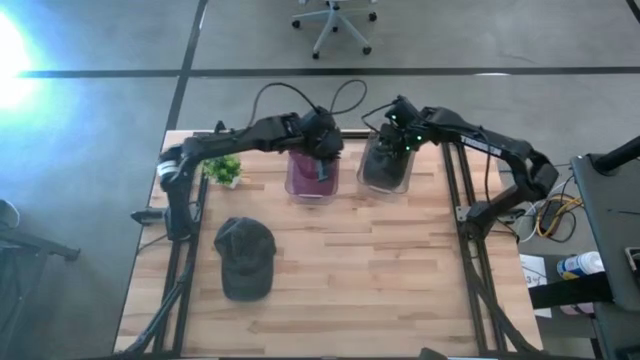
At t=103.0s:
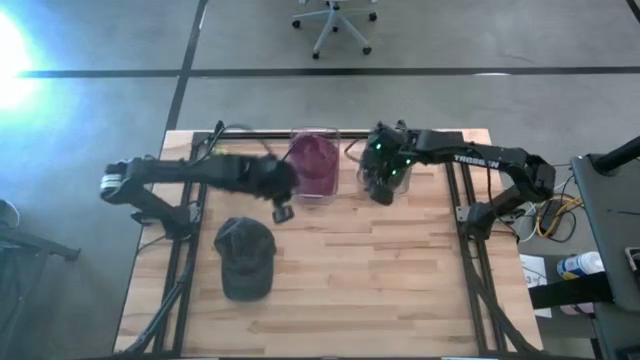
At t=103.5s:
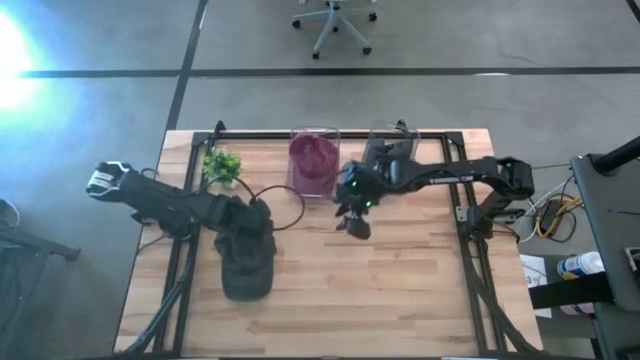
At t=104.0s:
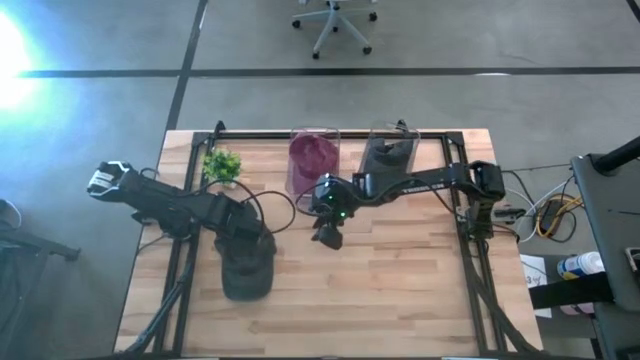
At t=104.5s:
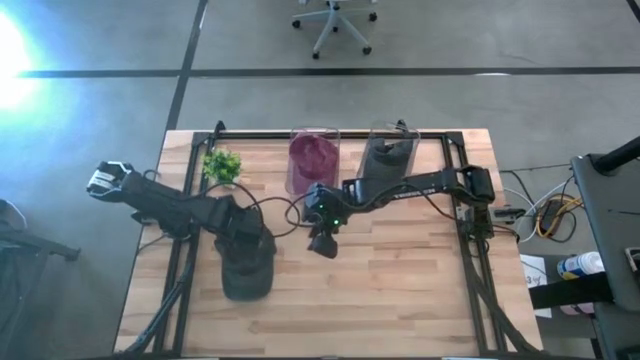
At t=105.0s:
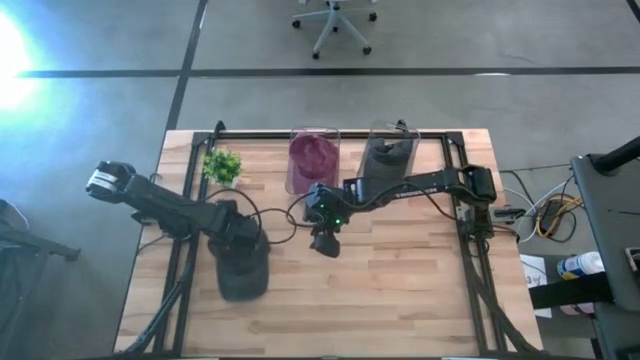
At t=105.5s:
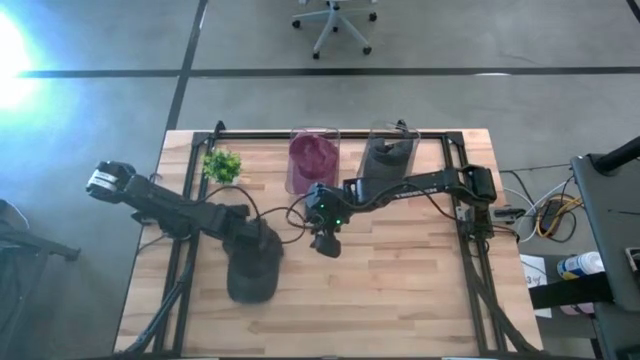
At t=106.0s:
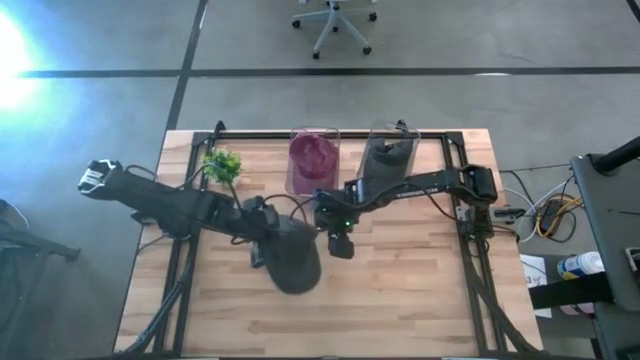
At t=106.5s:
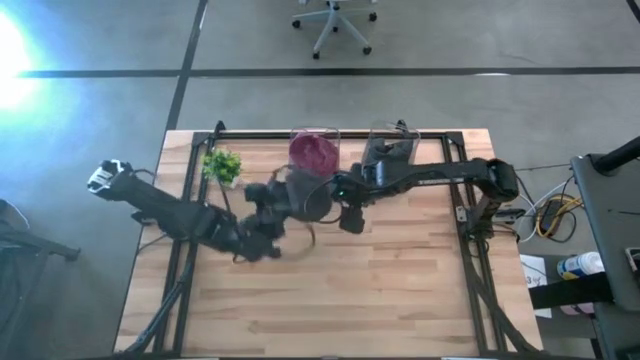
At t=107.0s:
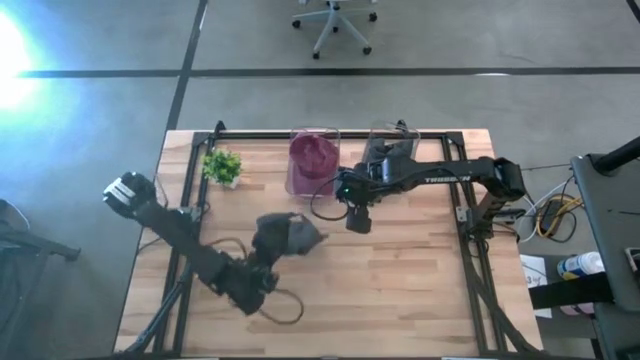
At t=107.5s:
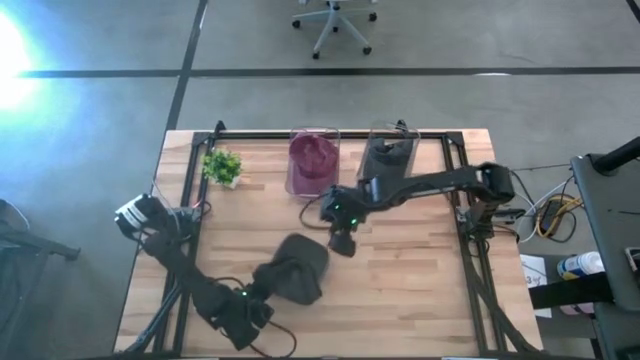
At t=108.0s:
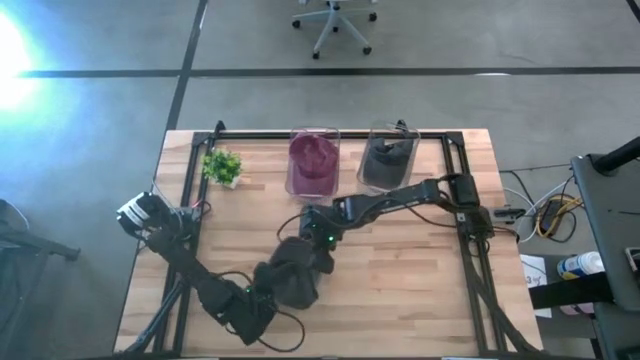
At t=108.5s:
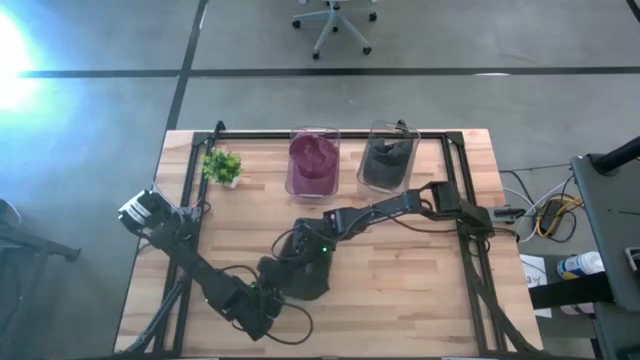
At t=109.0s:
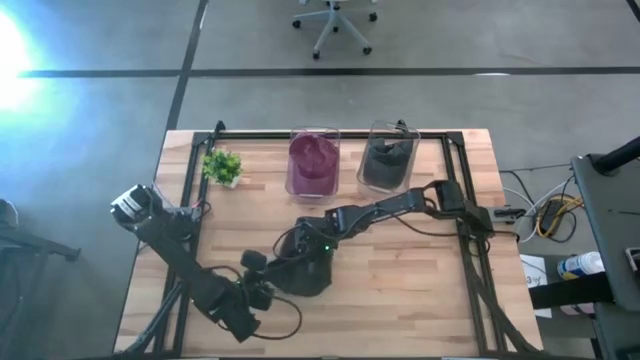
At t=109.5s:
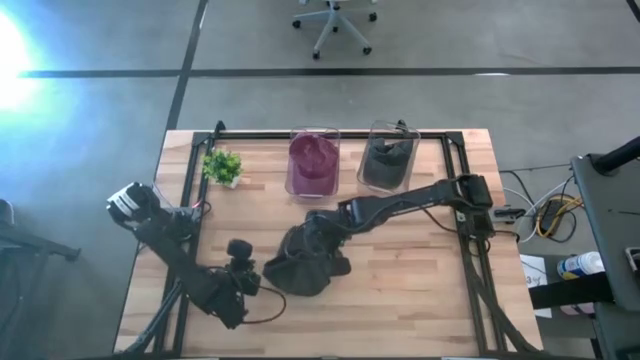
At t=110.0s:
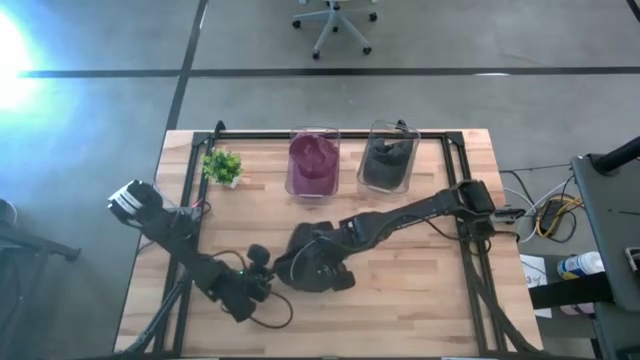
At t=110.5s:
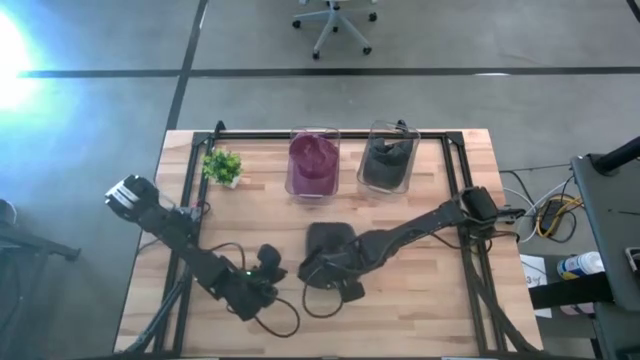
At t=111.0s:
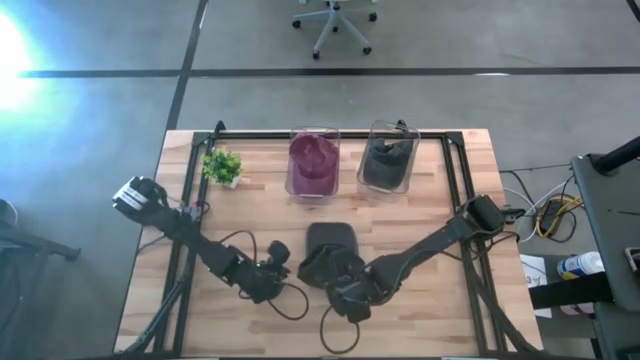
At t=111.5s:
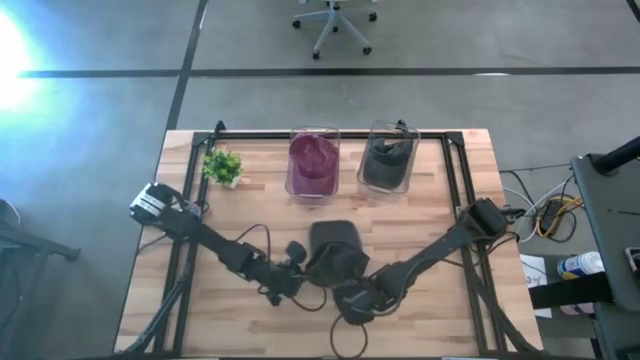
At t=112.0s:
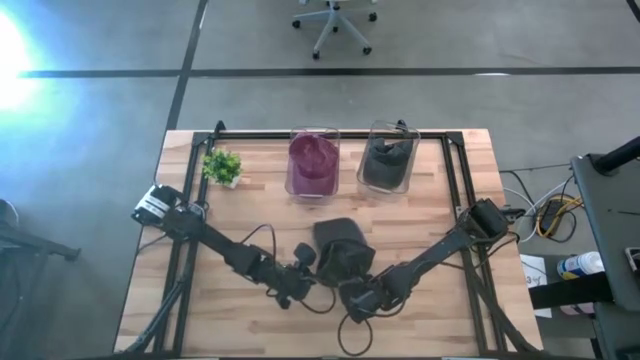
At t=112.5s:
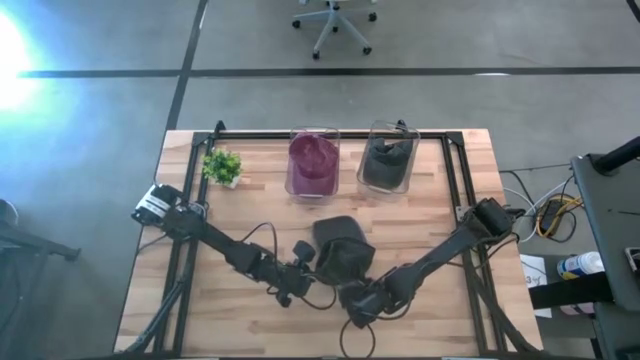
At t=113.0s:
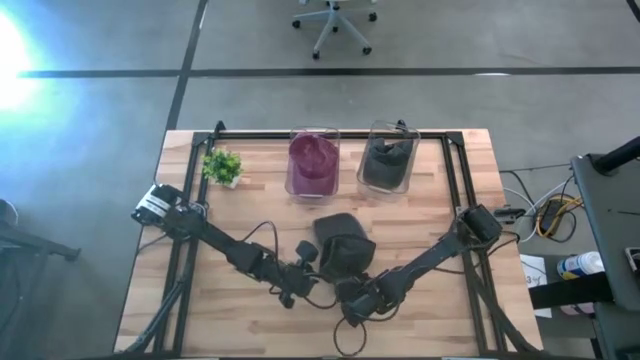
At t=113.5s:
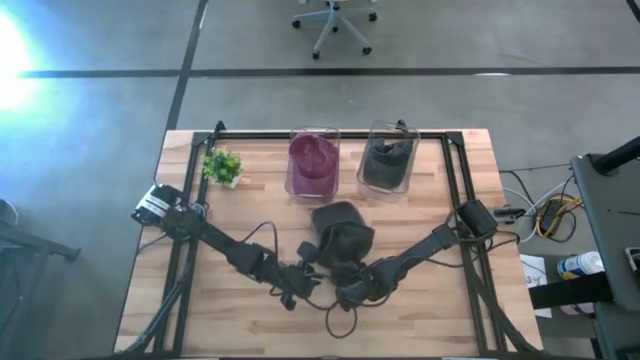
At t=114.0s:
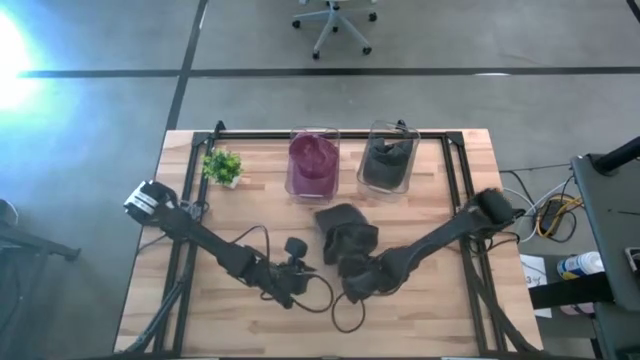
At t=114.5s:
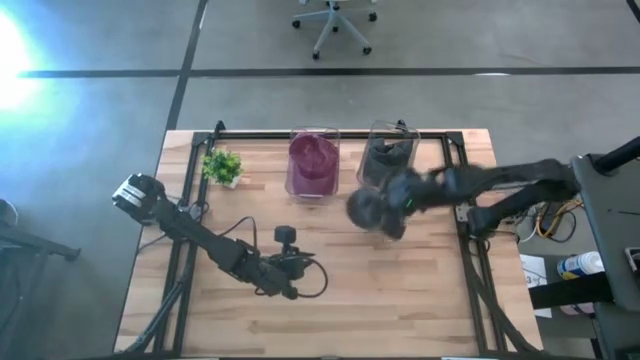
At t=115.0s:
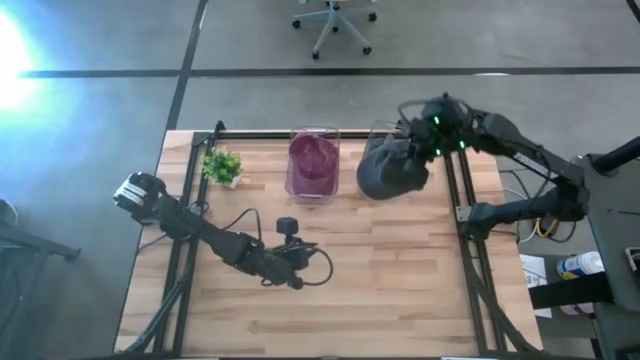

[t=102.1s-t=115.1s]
Task: Pick & Place hat
Put the black cap into the right transparent bin

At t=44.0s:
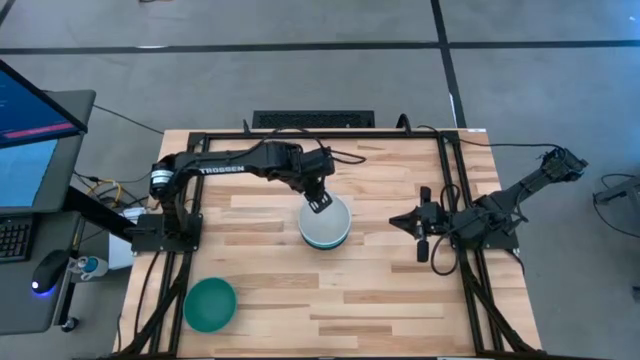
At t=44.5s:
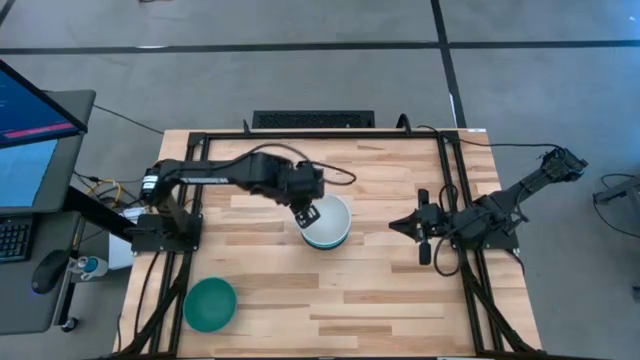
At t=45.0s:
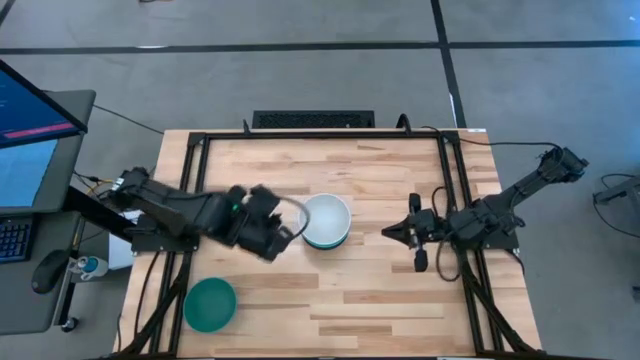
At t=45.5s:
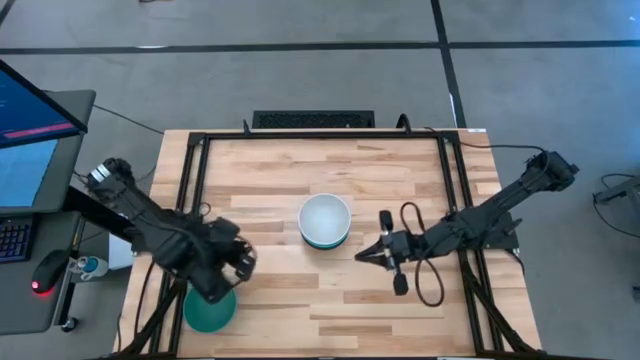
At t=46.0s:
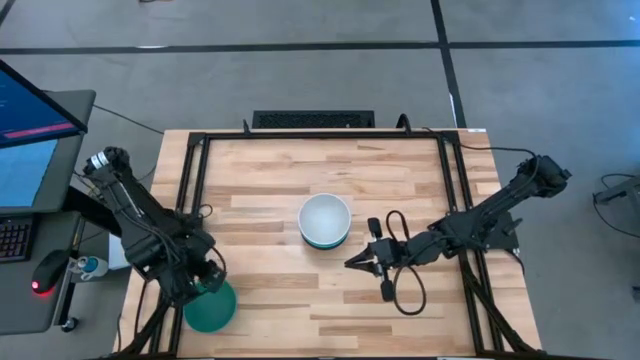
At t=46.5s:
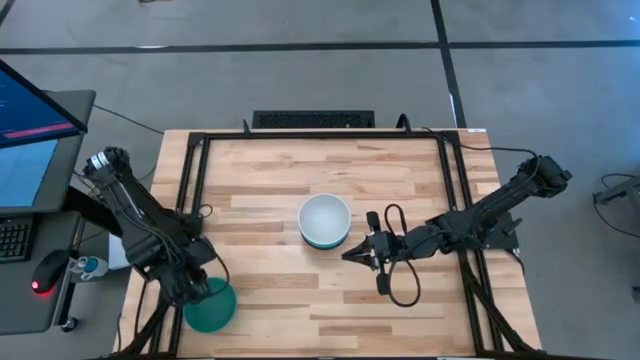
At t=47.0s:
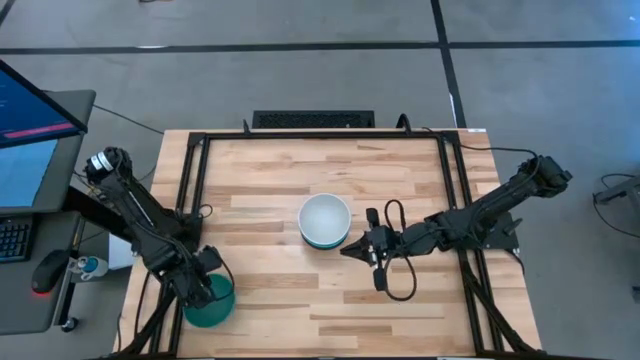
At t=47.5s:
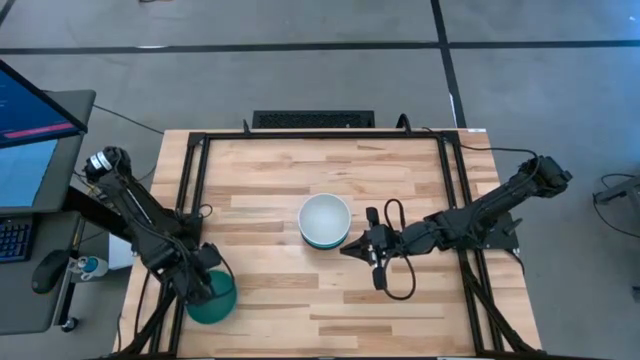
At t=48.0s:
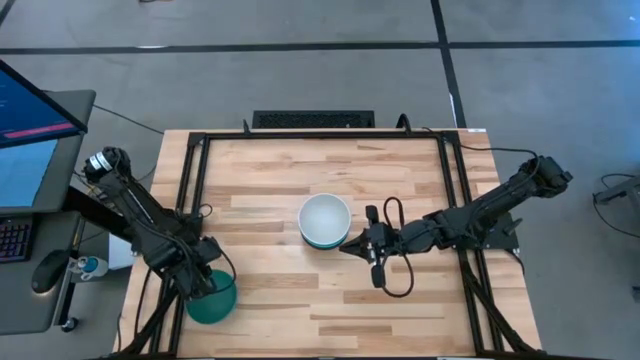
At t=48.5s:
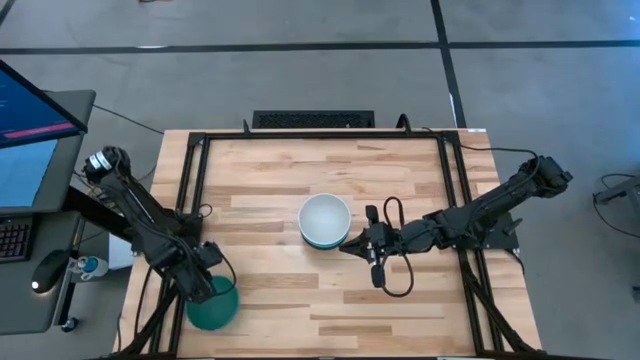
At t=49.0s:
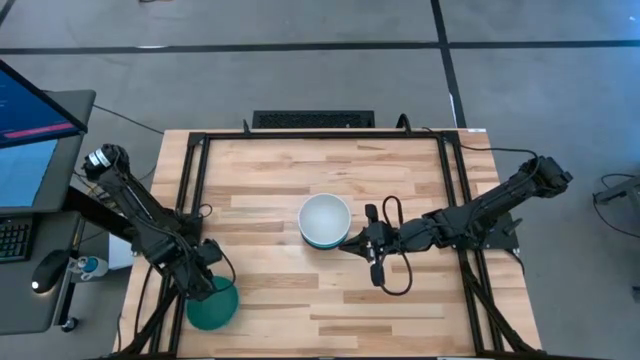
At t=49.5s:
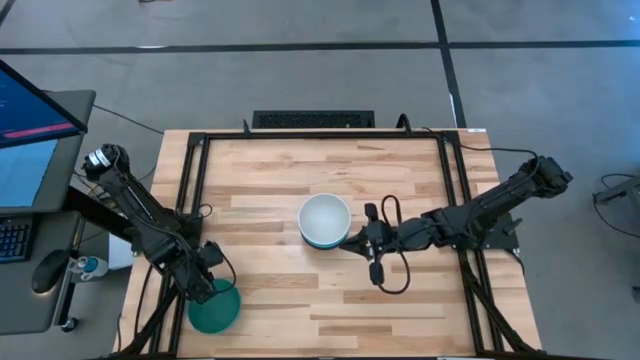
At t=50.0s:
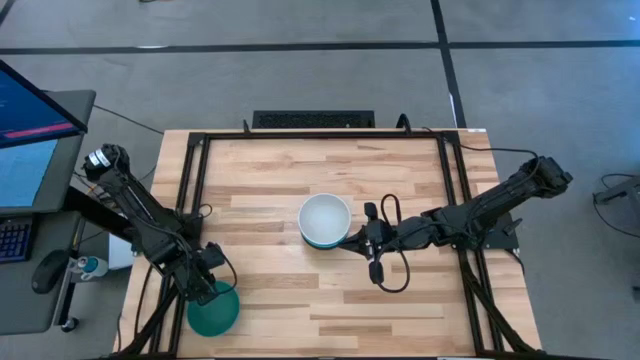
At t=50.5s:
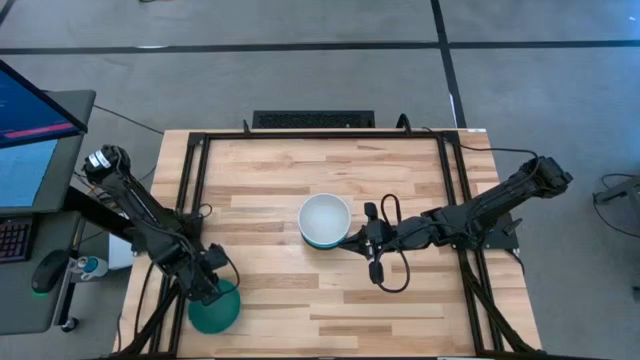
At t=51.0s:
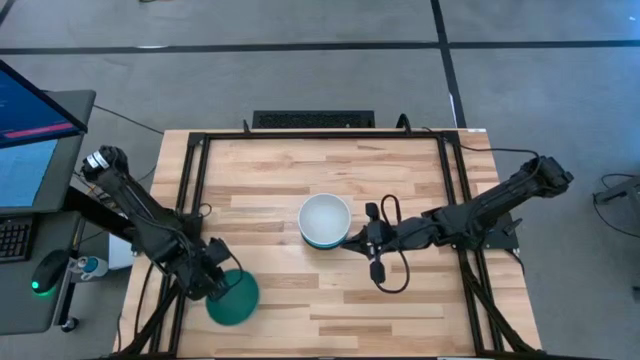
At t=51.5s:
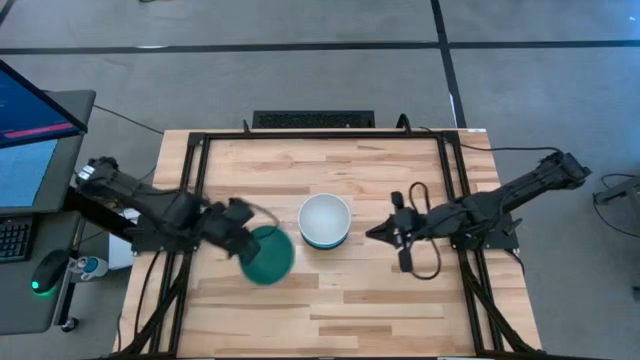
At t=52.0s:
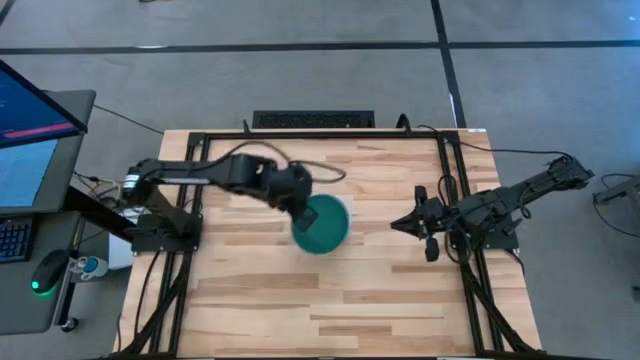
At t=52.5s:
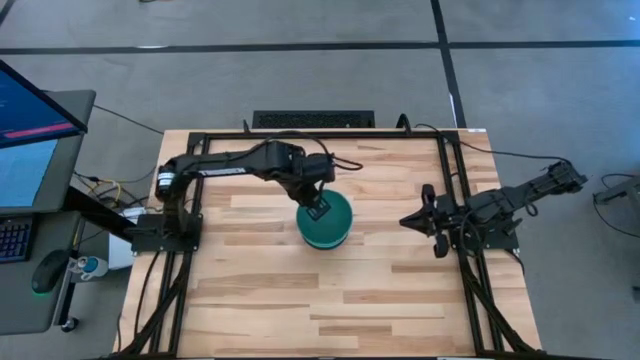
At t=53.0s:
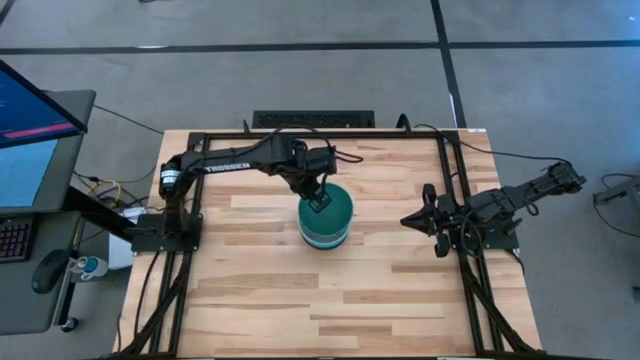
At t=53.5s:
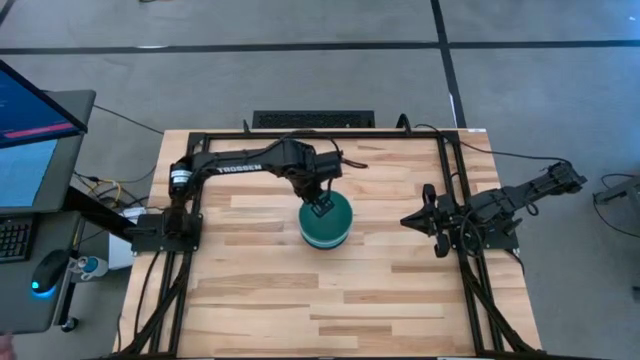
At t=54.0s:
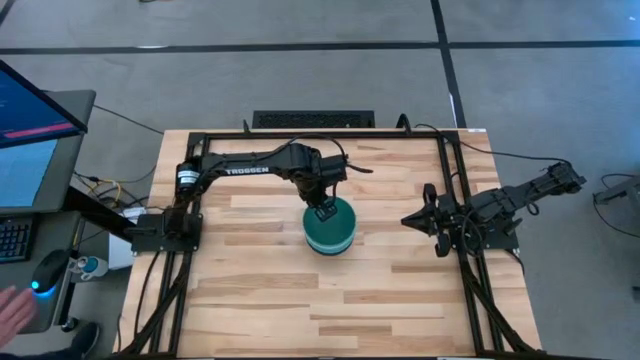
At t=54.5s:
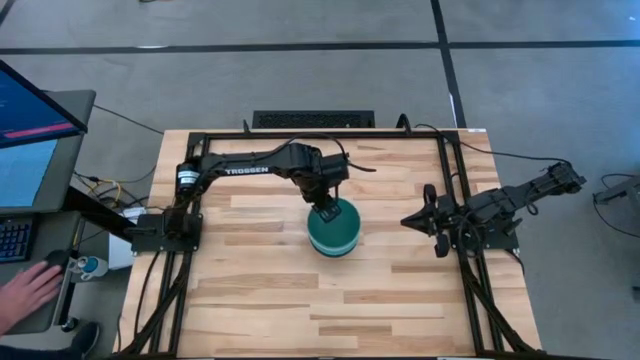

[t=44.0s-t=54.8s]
Task: Nest bowls inside each other
Stack the green bowl on top of the white bowl
